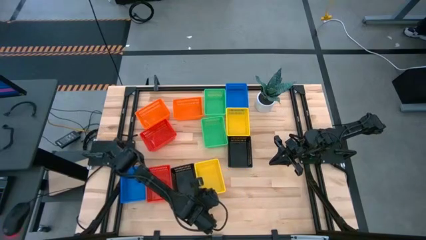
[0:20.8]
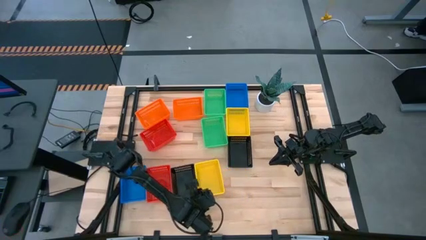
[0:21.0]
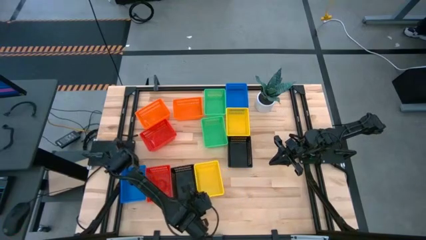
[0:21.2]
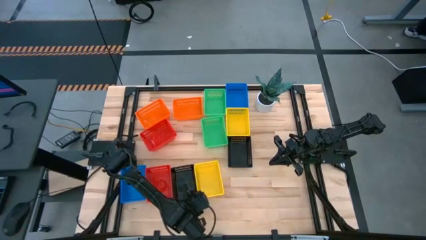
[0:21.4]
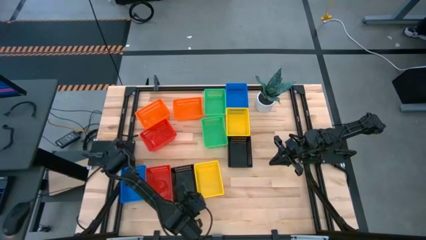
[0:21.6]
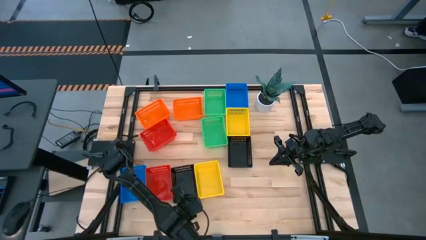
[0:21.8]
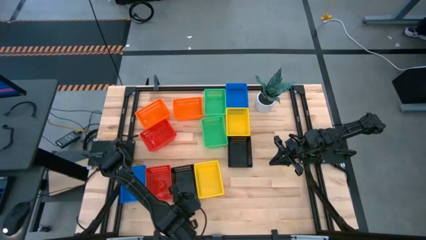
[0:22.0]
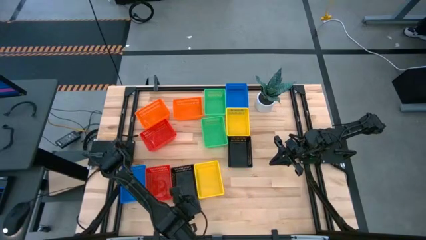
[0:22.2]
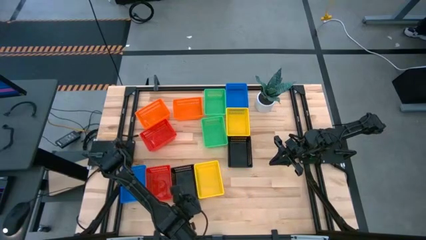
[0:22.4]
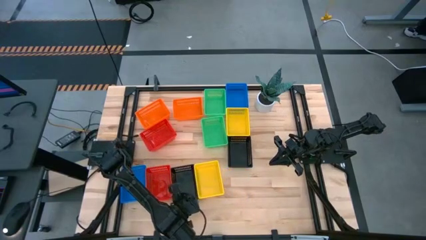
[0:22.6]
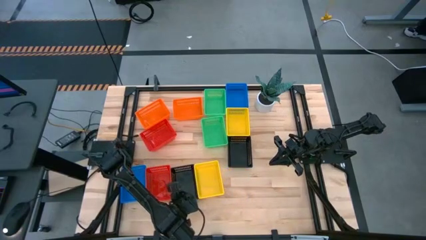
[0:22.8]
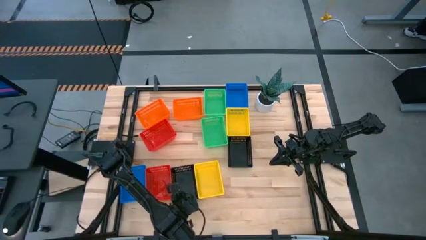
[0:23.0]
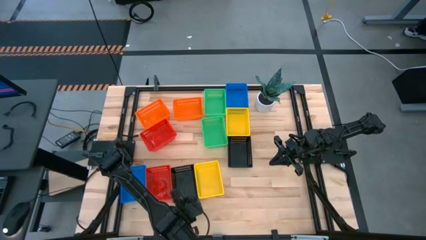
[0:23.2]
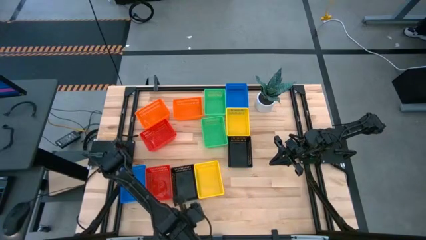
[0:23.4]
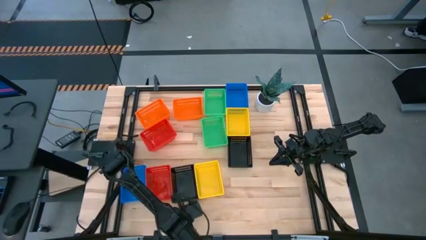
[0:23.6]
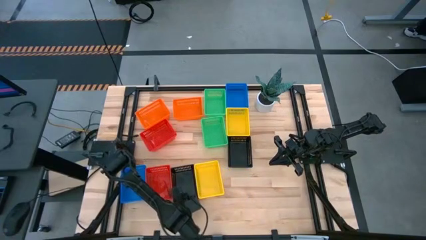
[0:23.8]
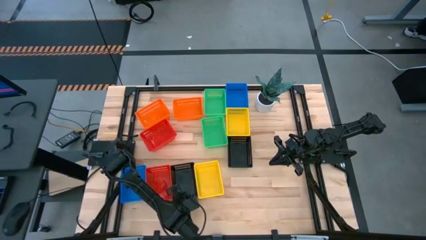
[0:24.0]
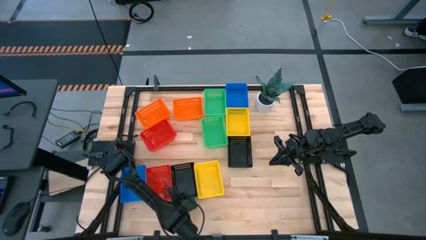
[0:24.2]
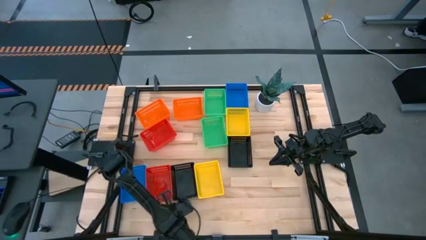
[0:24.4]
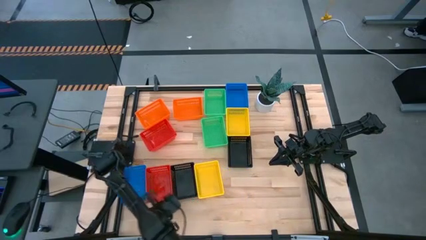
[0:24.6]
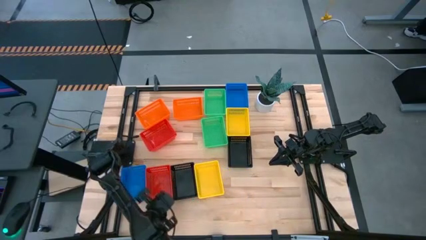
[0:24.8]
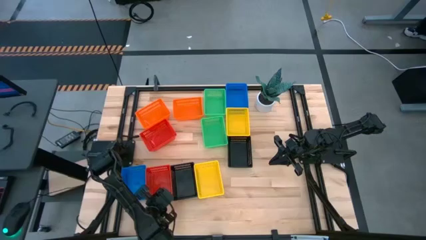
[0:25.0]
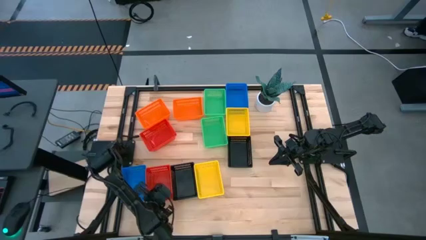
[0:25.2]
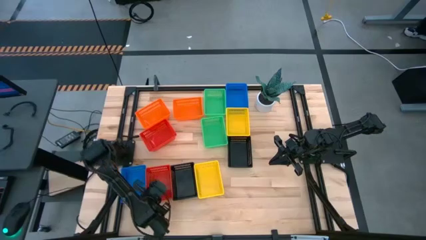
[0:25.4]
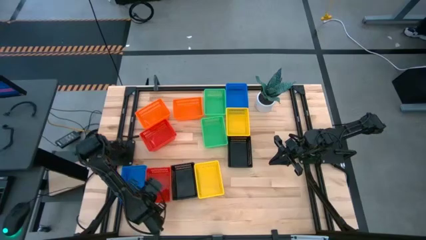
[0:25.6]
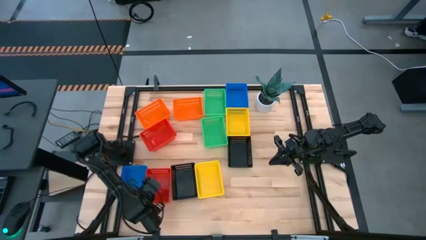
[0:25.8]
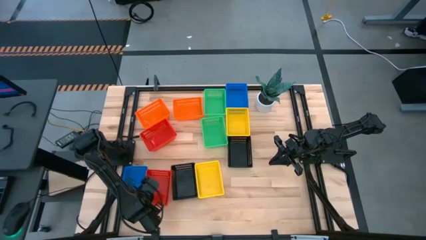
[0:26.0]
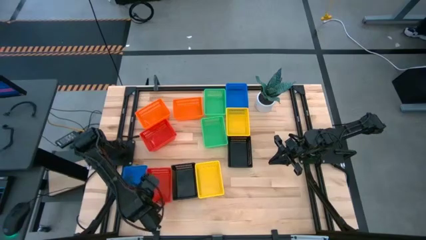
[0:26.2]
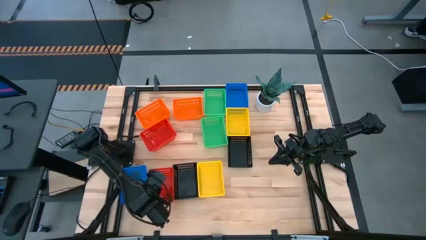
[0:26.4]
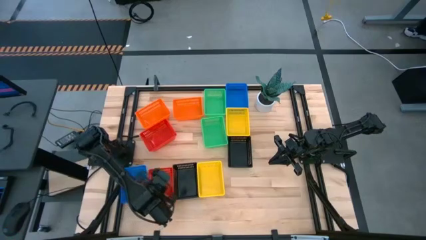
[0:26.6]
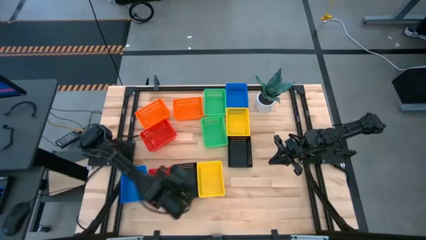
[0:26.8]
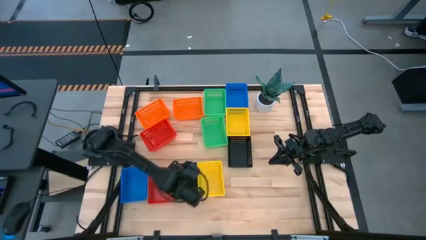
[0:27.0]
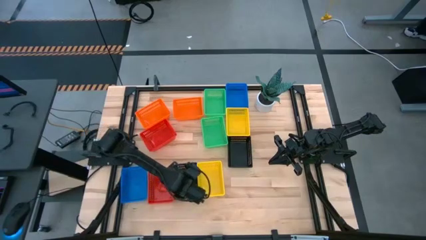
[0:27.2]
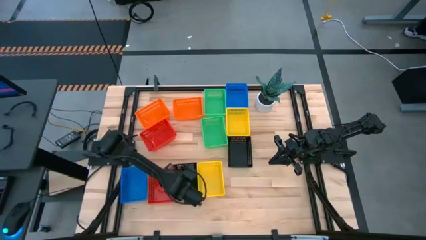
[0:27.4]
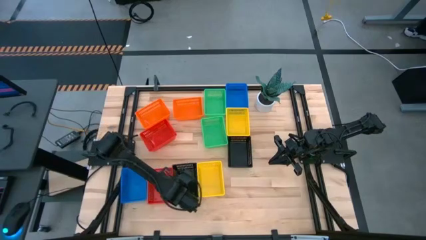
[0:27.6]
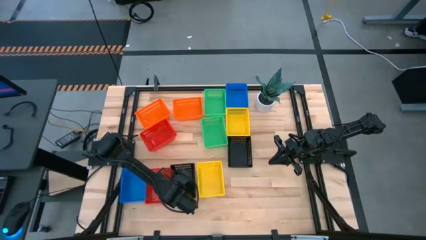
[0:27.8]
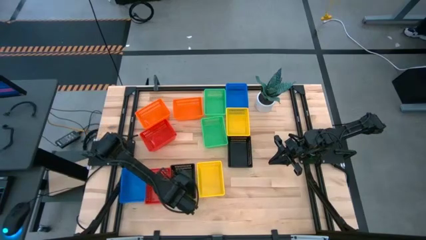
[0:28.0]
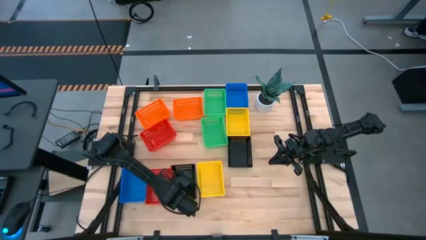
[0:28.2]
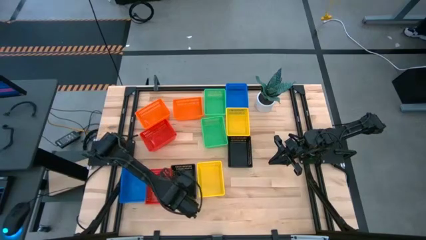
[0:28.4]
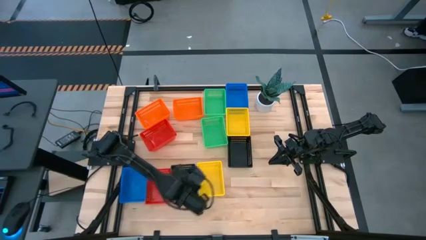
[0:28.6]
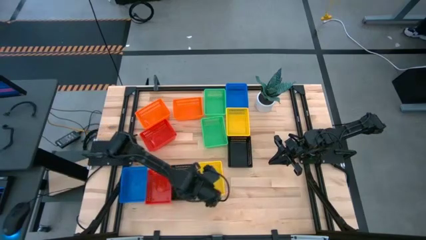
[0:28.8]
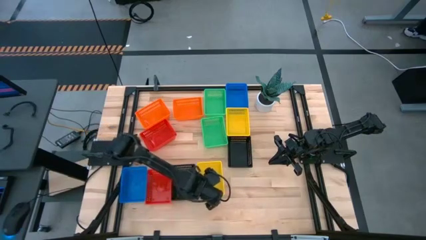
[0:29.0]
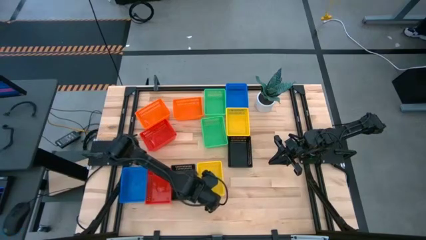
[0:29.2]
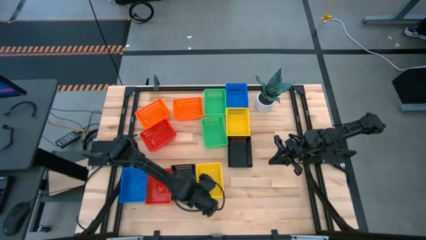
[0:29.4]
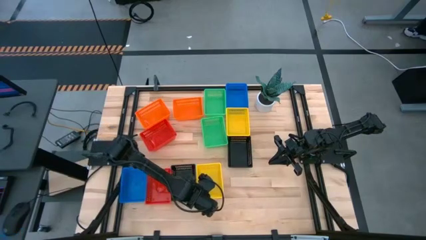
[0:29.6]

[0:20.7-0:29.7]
Adjust the colored bins

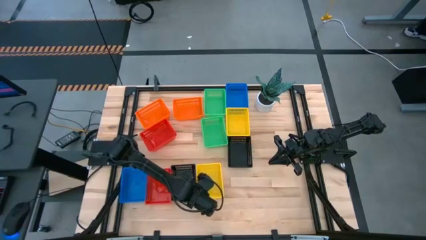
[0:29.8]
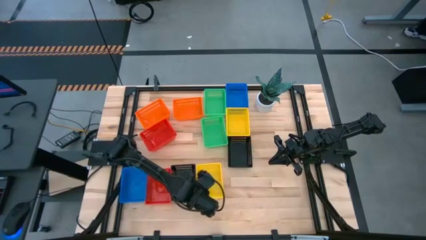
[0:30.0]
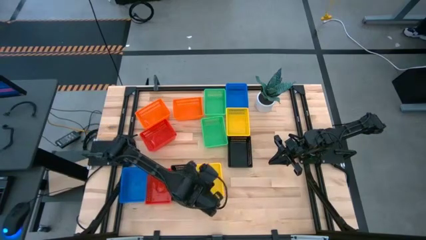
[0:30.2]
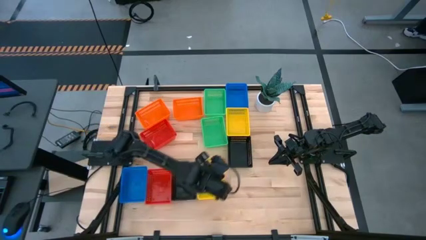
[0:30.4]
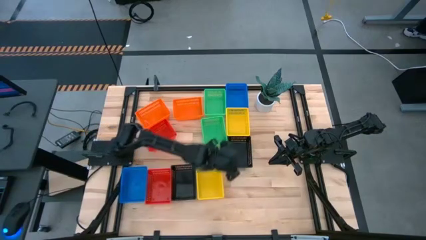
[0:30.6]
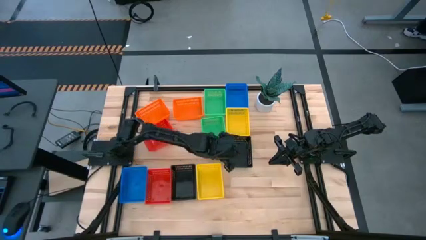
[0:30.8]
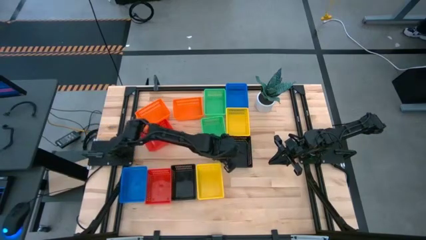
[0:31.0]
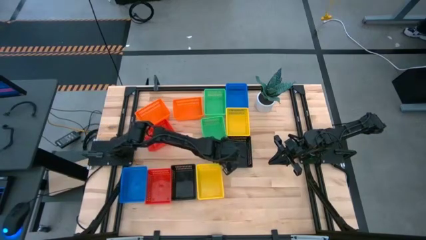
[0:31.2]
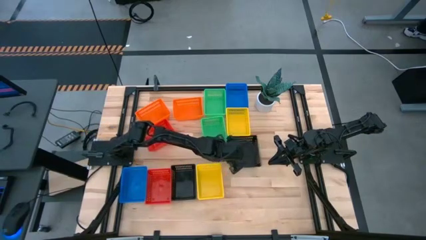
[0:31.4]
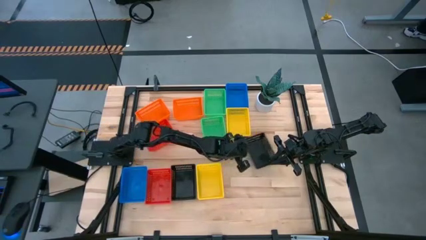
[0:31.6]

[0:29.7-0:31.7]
Move the right black bin to the middle right of the table

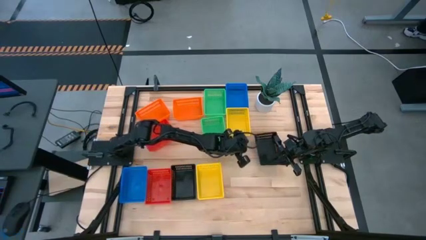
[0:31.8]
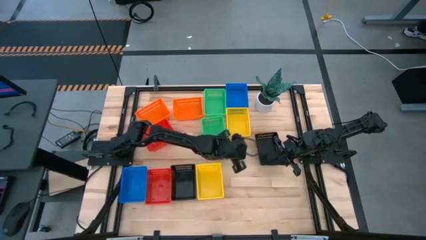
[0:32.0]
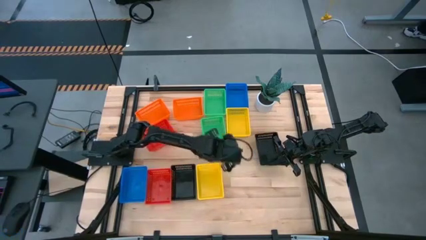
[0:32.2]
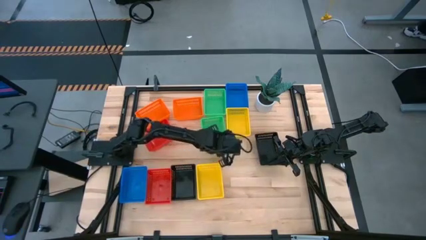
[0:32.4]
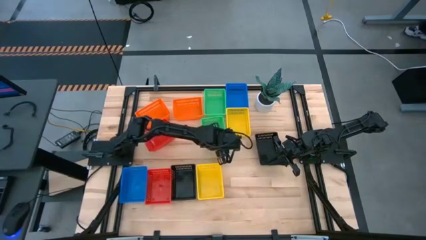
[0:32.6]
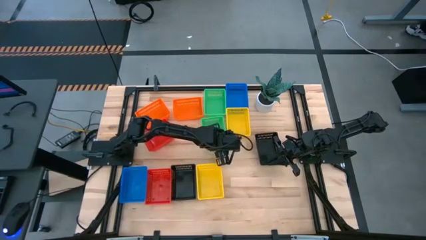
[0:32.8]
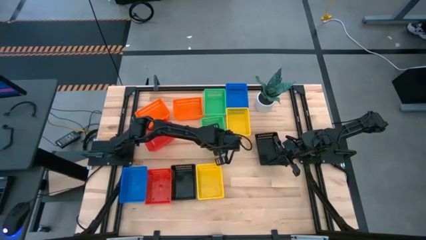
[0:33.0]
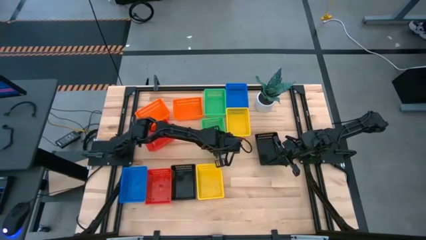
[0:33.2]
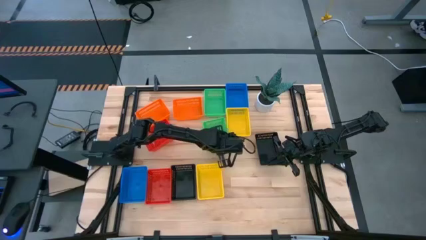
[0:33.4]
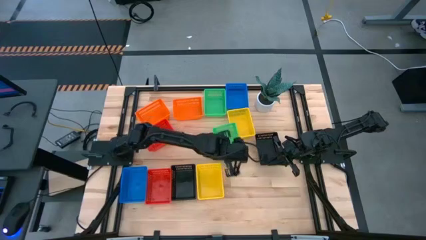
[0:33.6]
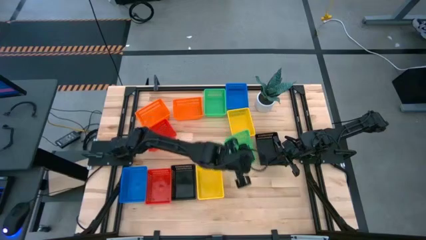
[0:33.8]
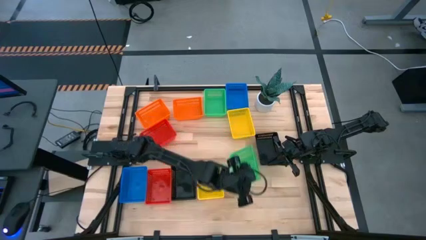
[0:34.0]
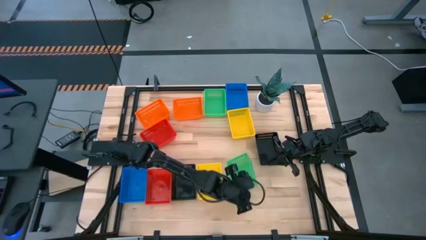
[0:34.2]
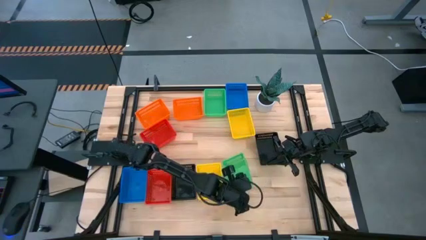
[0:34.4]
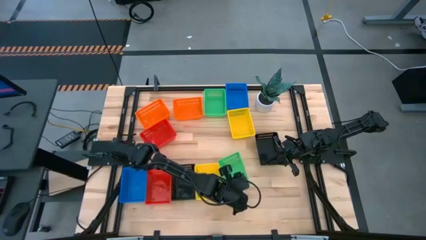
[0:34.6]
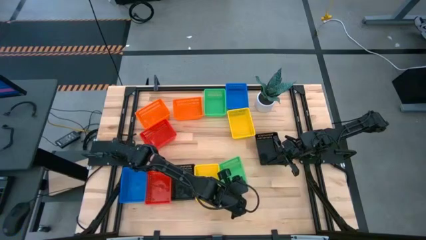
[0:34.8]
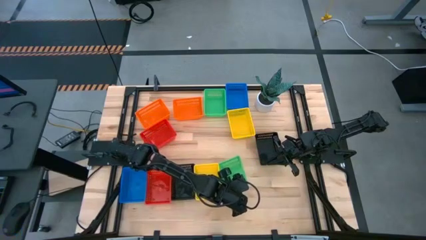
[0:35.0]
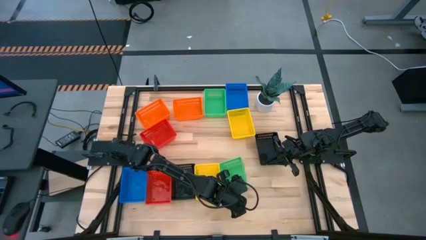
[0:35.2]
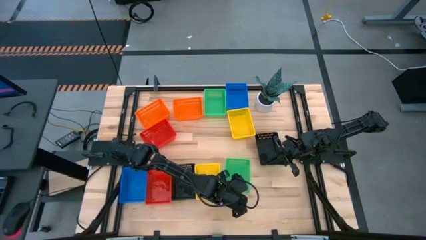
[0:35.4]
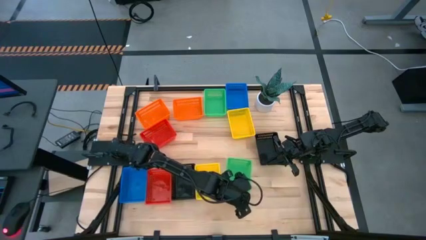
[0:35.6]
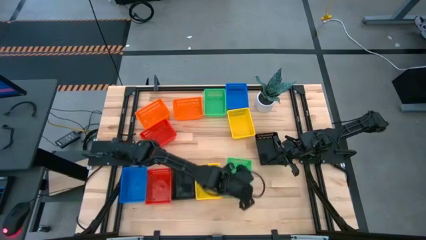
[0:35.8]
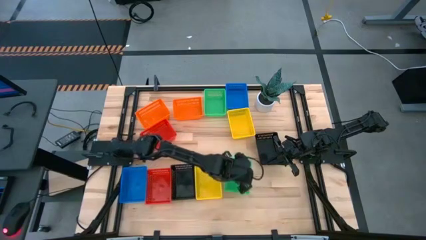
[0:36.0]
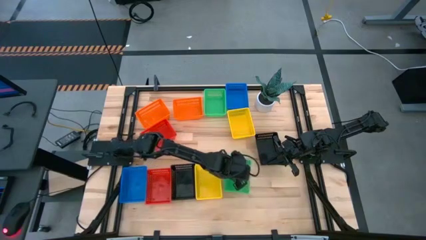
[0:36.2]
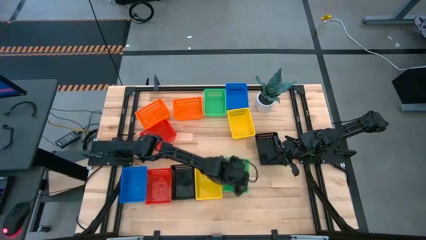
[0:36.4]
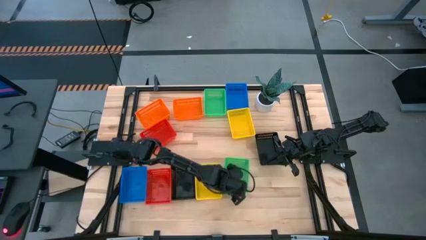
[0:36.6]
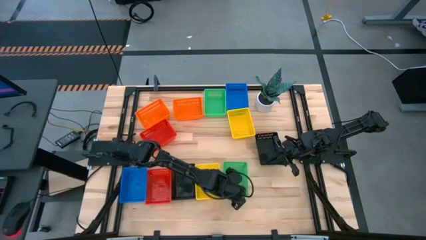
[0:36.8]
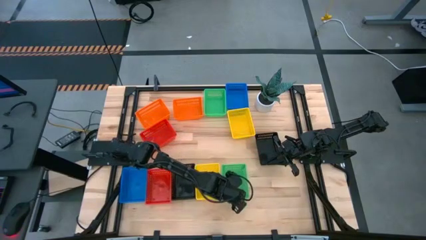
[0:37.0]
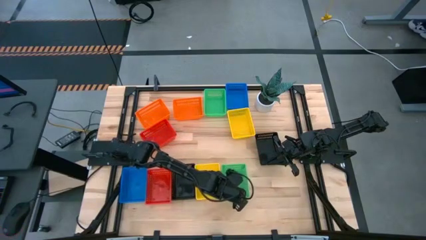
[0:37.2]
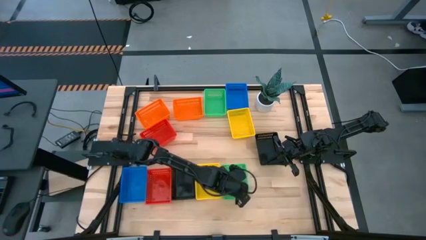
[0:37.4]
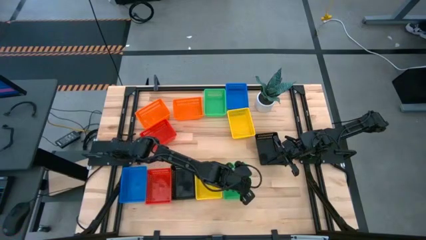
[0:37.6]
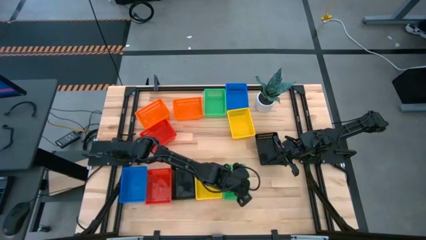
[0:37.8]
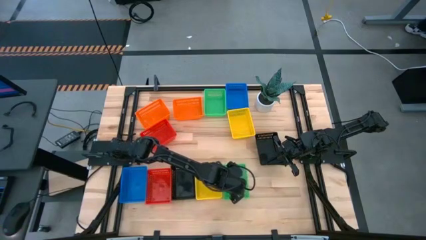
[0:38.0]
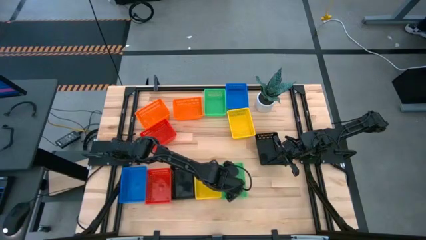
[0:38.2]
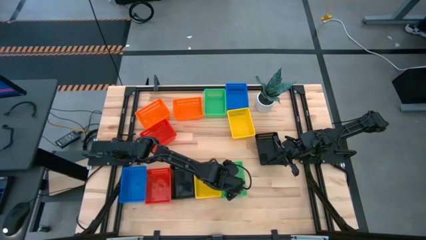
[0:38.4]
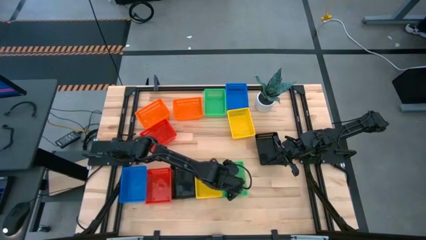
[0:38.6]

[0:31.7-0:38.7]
Move the bottom green bin to the bottom middle of the table
